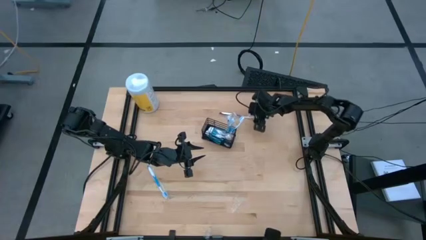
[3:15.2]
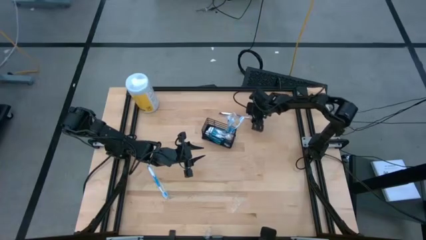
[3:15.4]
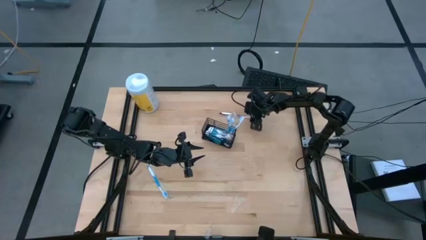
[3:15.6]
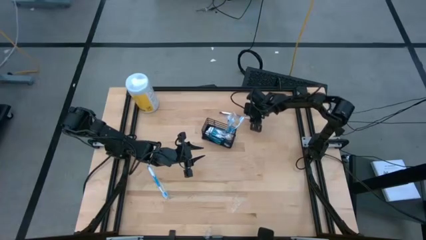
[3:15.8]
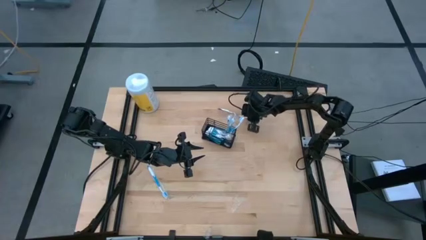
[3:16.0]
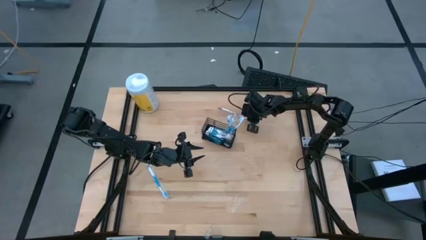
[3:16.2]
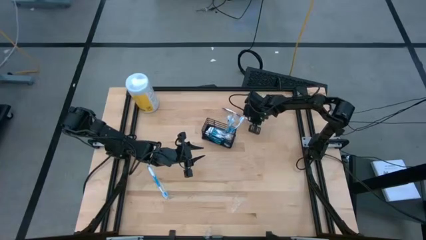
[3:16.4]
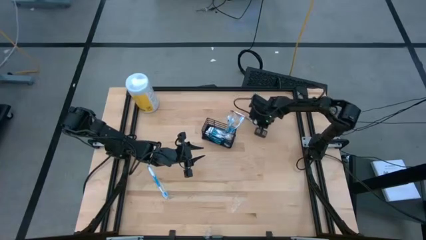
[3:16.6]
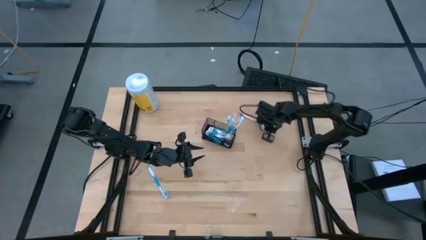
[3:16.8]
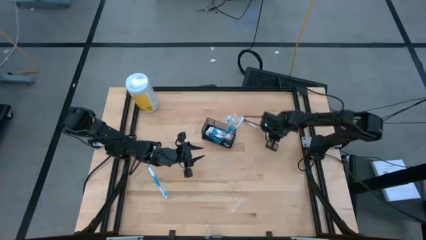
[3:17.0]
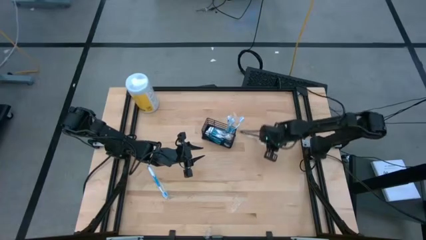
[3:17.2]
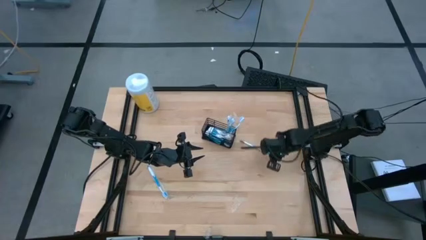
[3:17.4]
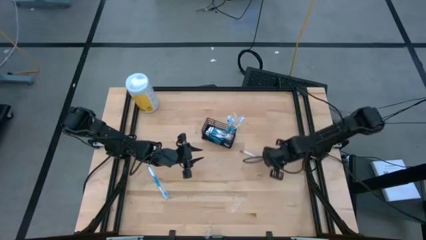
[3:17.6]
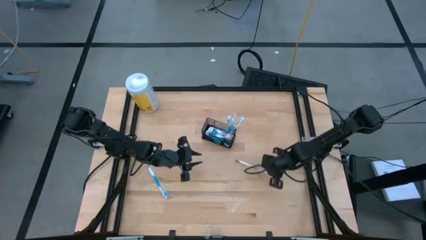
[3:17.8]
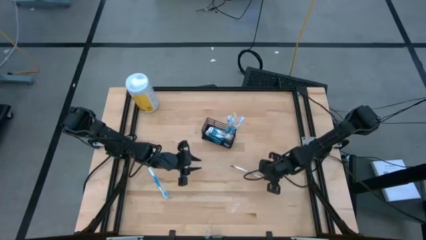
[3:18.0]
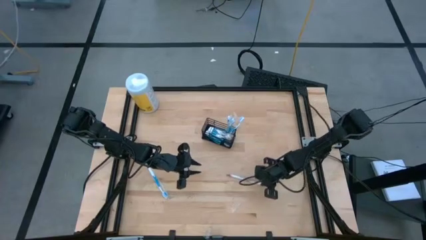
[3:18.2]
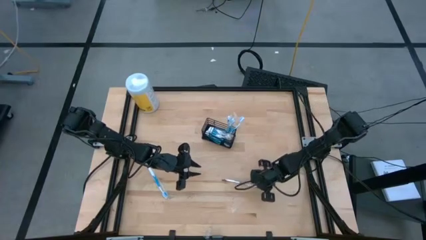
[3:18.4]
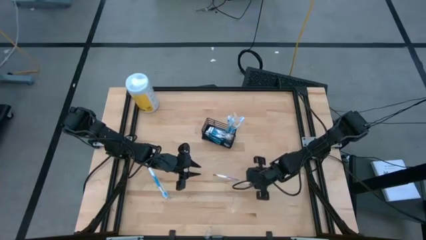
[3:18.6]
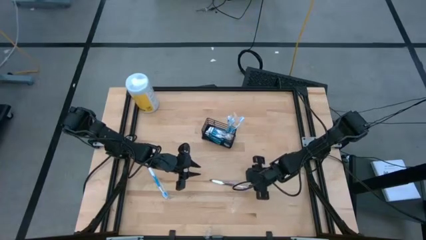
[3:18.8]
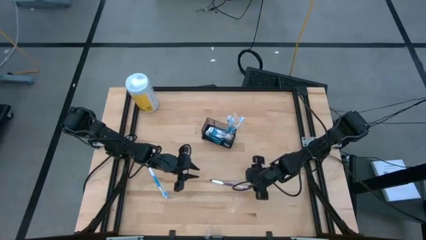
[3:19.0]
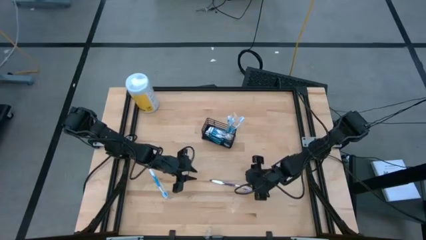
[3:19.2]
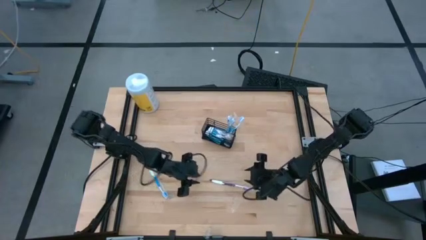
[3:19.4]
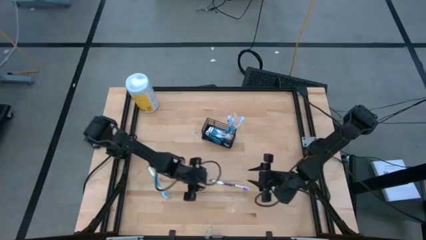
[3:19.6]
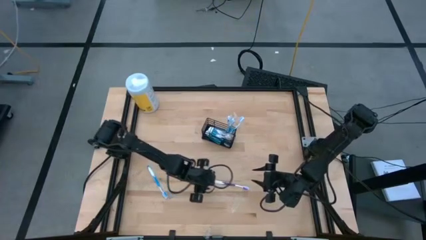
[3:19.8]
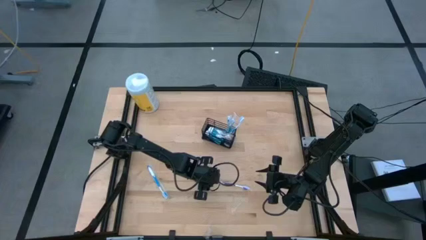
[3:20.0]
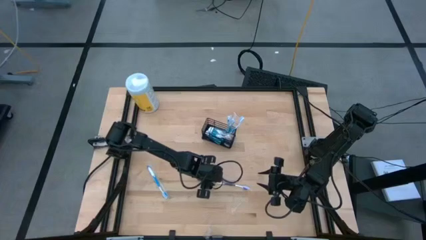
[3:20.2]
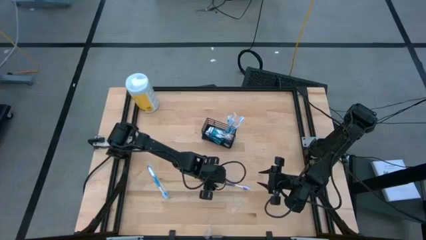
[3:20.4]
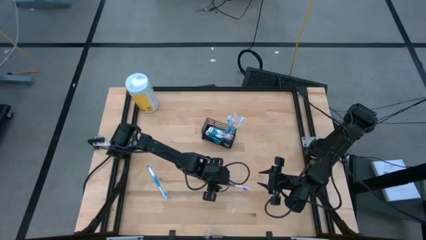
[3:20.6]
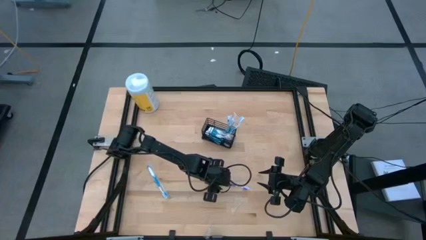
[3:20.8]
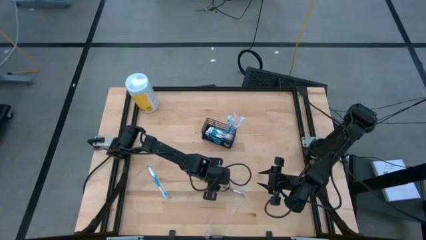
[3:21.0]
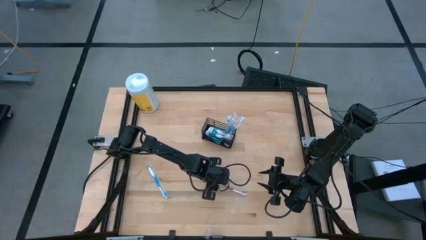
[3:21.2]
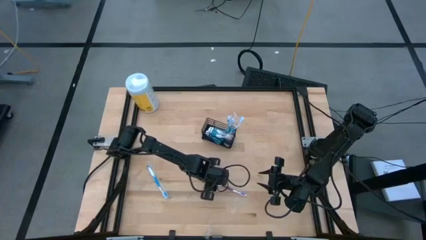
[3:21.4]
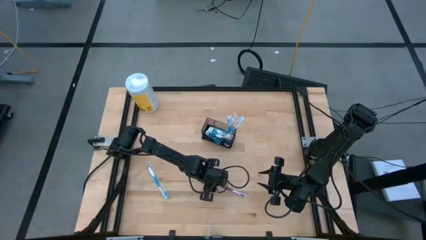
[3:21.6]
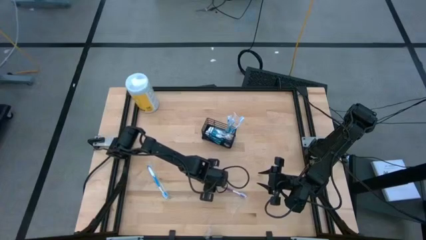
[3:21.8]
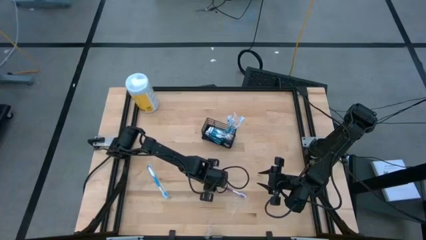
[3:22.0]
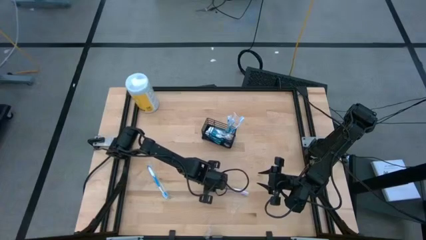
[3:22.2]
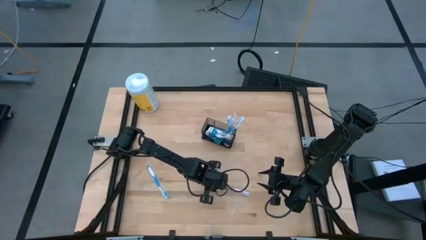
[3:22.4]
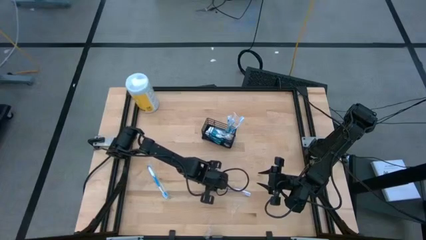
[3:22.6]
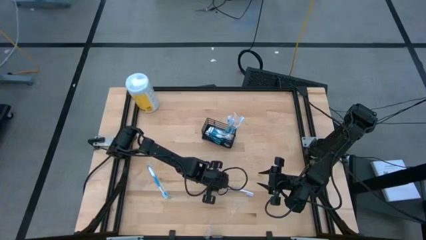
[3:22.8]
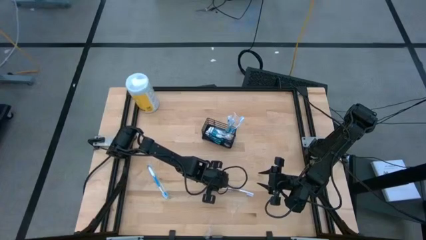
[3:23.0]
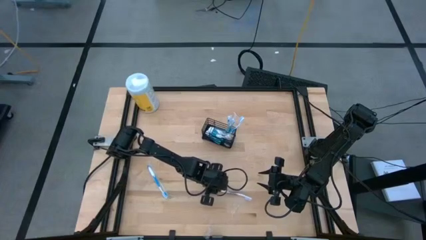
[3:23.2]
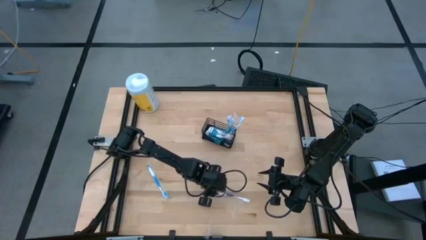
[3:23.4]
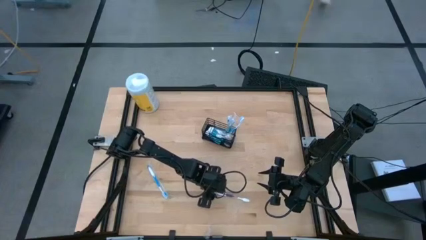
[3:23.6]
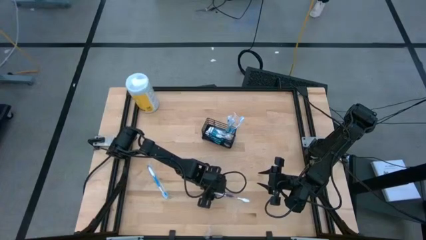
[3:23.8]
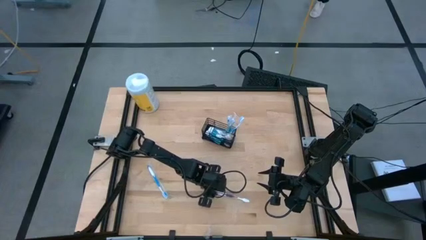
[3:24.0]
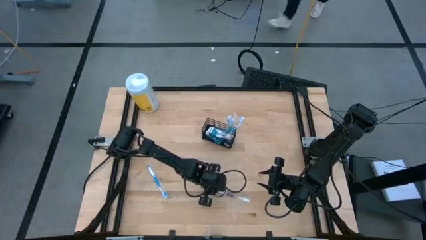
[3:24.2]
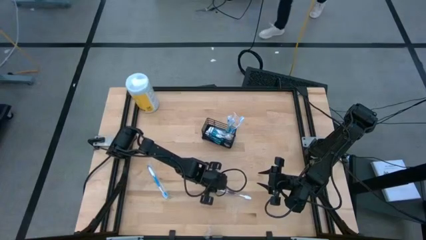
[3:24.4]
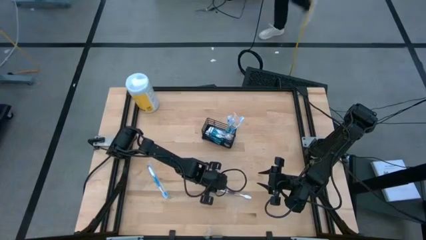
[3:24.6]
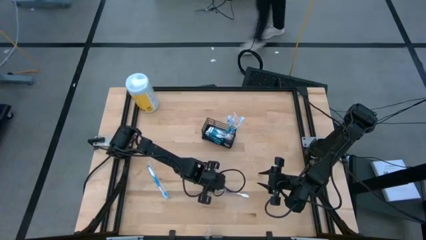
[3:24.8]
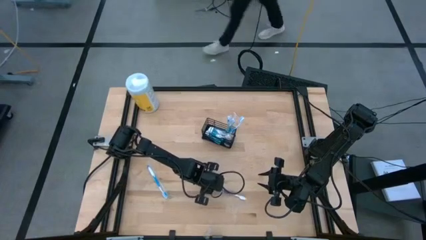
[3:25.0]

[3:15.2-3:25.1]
Task: Pick & Place toothbrushing station
Put the purple toothbrush into the wire organizer

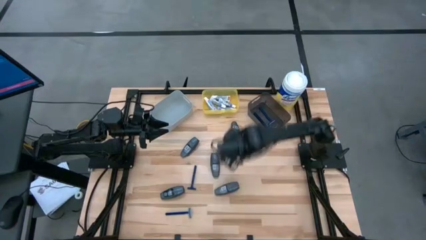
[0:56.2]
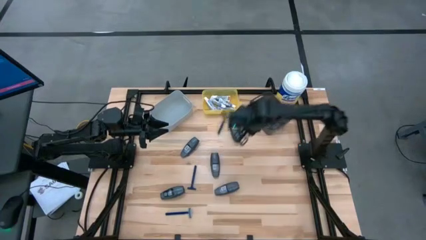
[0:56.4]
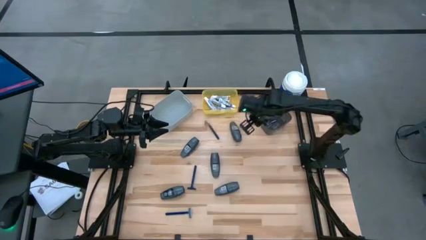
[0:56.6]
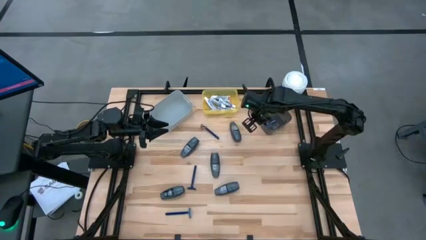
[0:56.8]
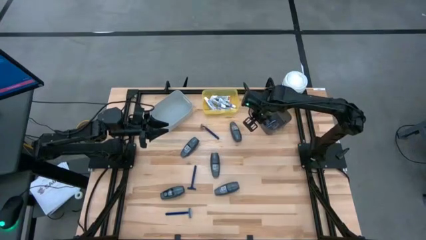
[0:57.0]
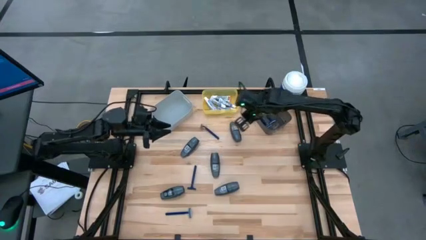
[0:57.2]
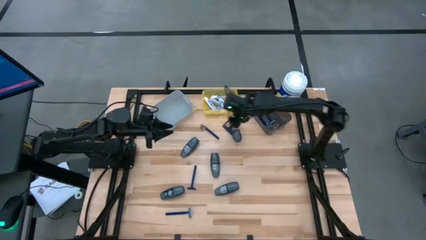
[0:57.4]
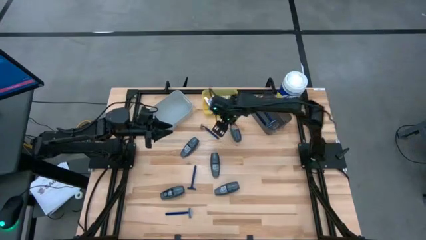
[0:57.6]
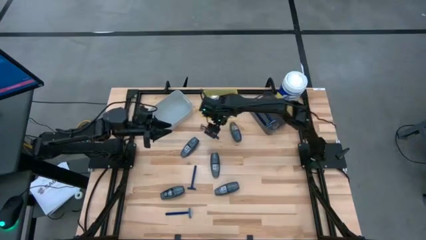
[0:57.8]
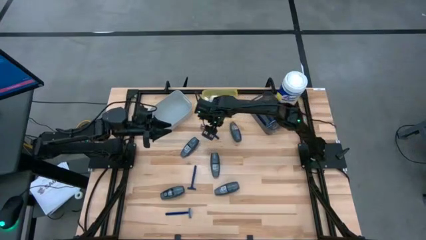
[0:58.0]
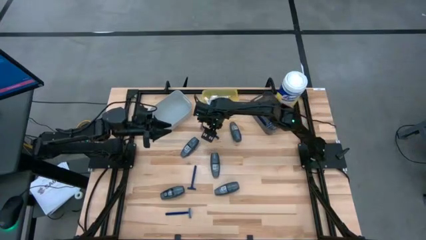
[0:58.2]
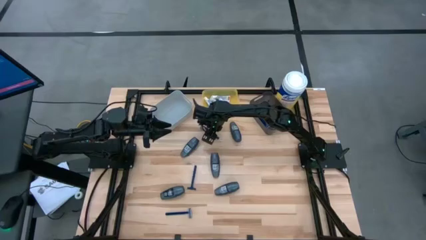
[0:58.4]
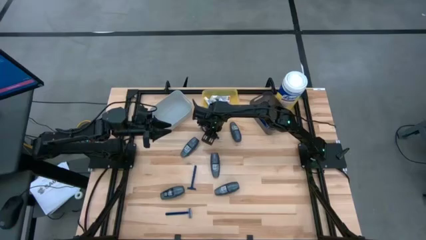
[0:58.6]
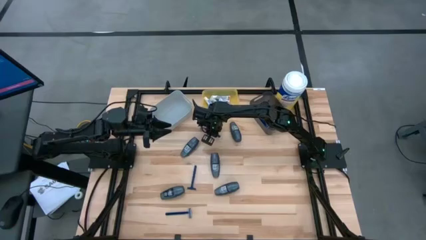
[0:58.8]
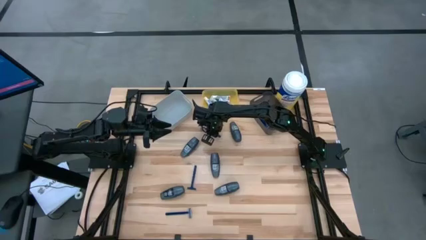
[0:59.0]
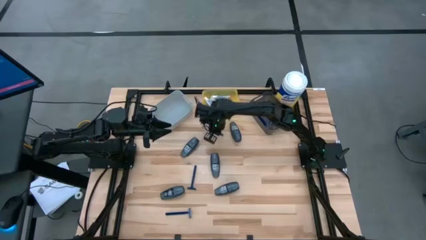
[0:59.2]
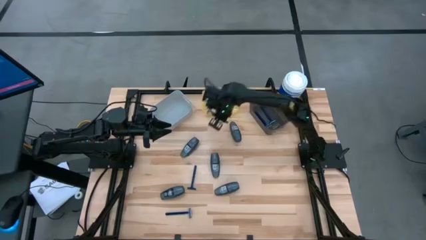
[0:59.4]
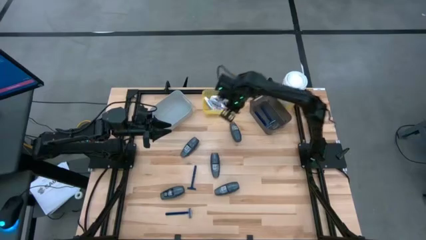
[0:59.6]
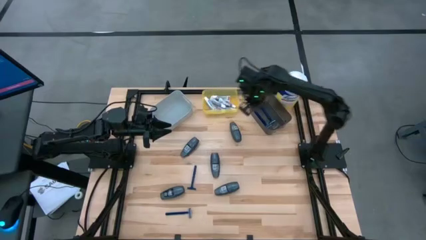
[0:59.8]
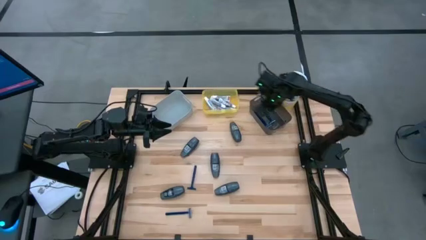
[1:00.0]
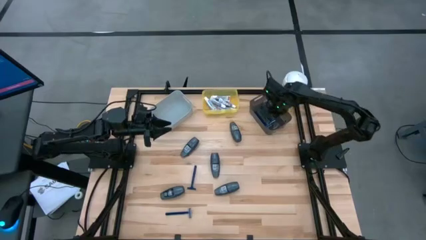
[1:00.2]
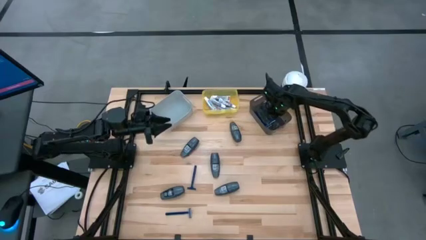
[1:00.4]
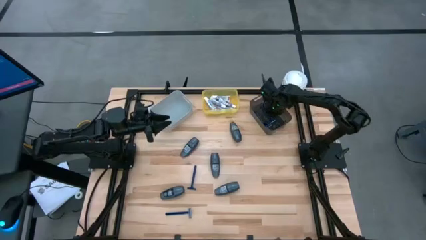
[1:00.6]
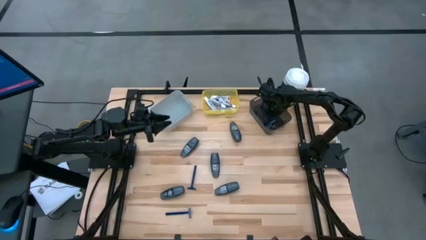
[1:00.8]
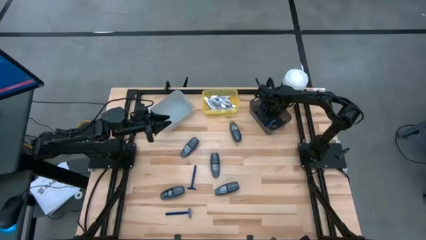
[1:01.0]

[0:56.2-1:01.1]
Task: Pick & Place Travel size toiletries
Put the blue razor into the black bin

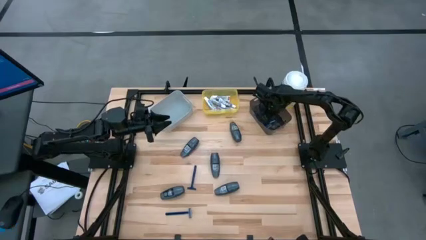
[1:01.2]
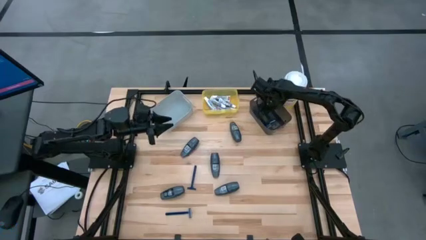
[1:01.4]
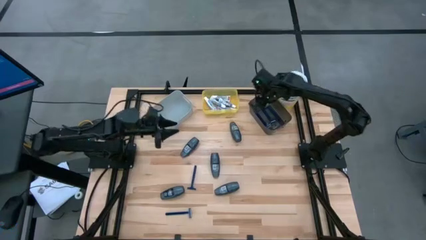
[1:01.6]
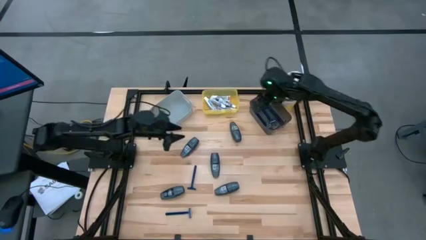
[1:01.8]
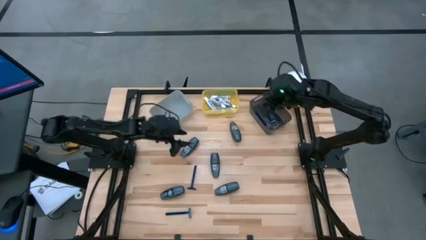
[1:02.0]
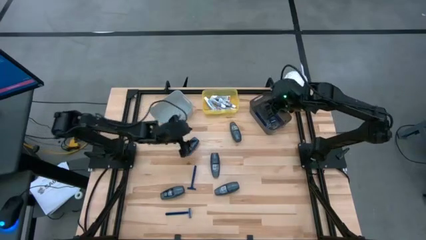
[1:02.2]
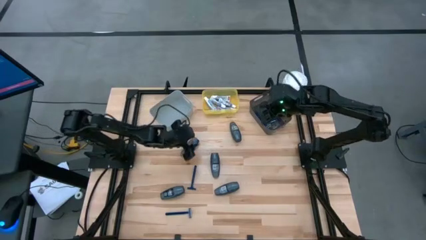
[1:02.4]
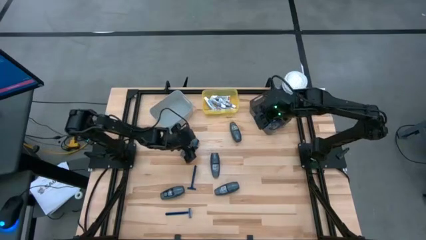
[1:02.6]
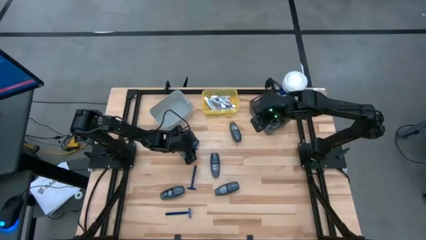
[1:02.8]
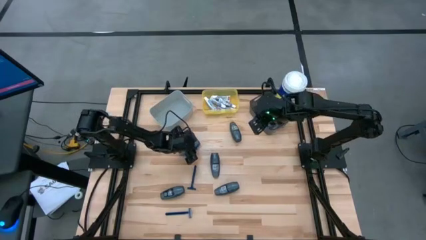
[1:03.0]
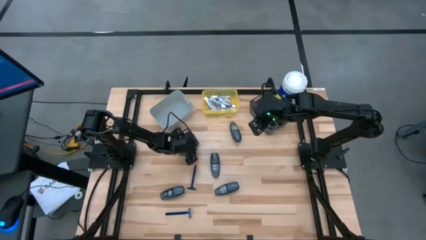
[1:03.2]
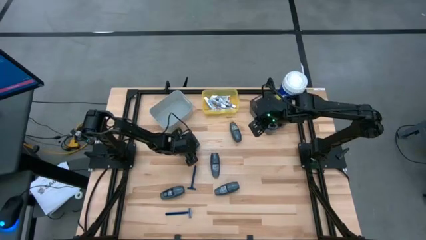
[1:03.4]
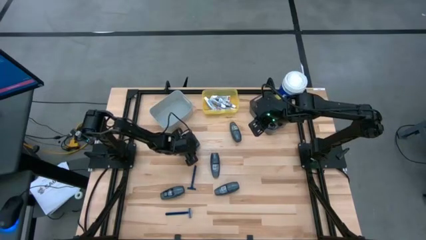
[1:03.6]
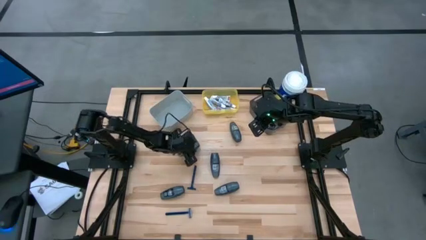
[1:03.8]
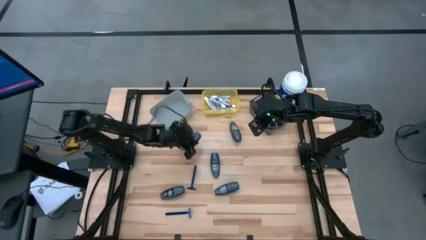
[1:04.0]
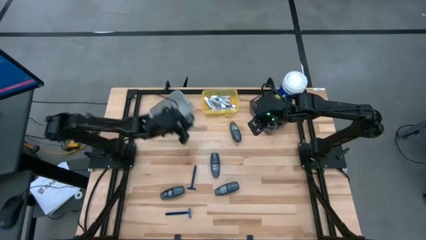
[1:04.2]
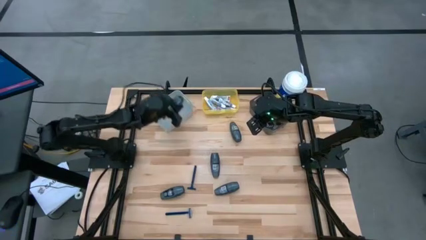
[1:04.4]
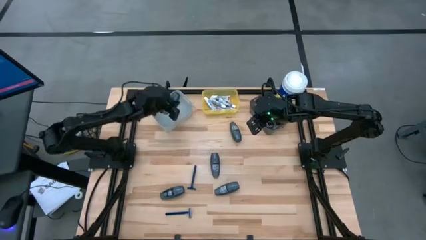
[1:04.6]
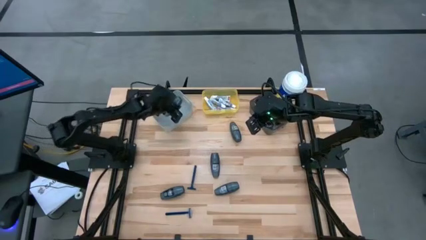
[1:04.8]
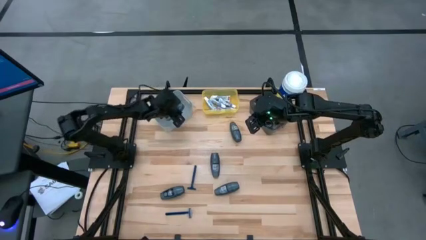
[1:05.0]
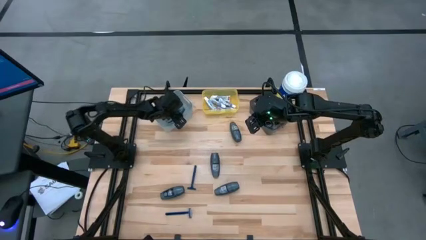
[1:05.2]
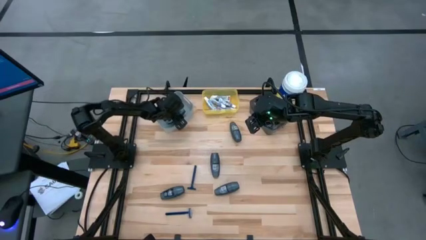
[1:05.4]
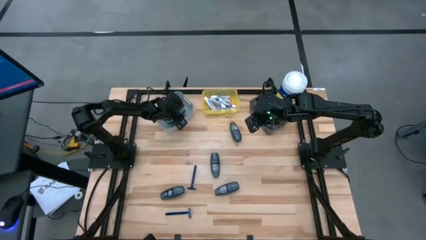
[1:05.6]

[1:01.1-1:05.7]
Put the gray deodorant into the gray bin
